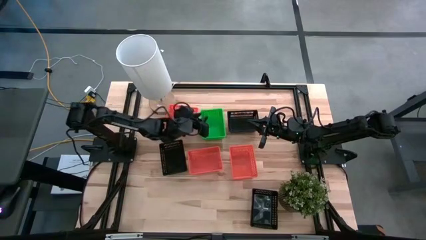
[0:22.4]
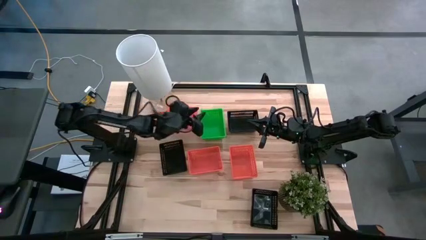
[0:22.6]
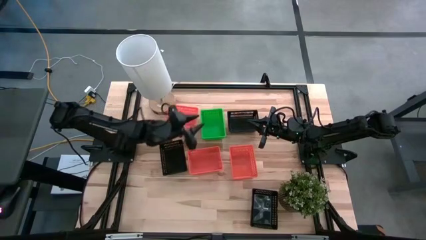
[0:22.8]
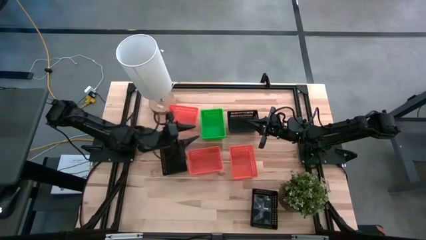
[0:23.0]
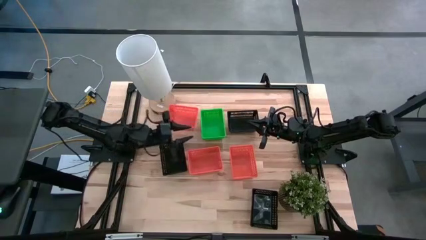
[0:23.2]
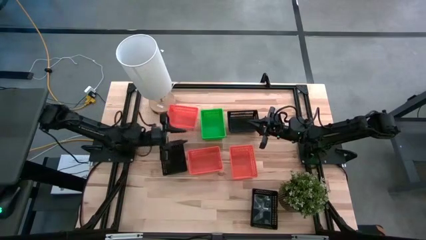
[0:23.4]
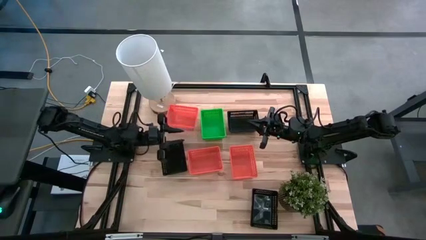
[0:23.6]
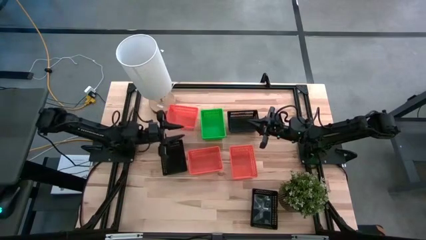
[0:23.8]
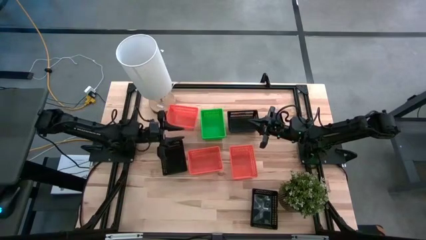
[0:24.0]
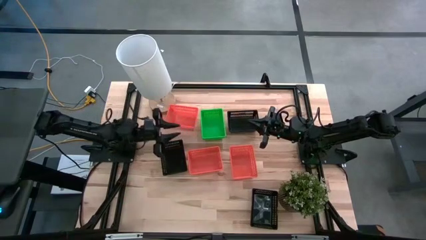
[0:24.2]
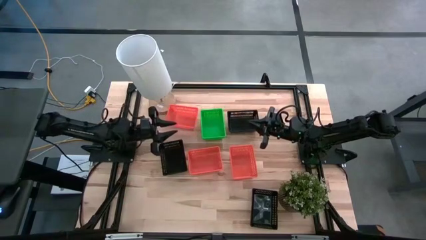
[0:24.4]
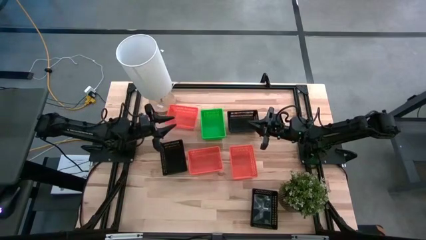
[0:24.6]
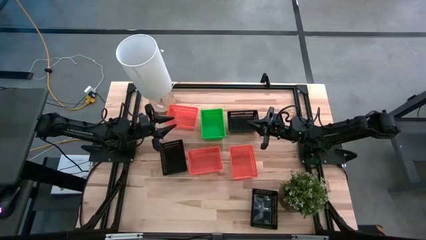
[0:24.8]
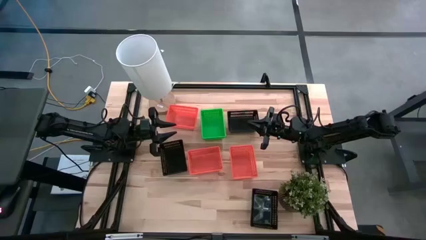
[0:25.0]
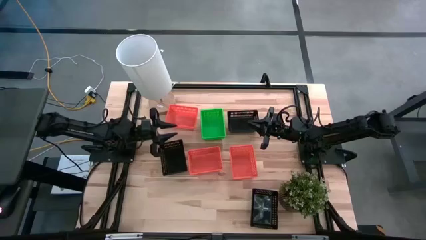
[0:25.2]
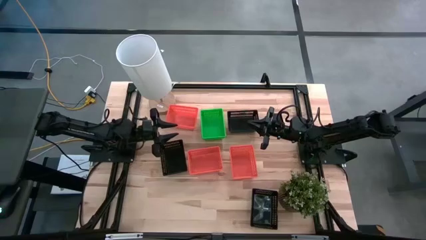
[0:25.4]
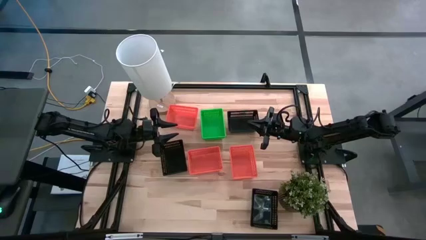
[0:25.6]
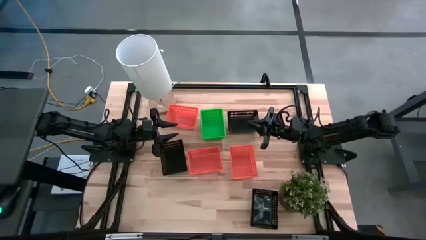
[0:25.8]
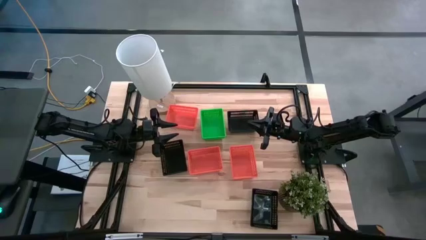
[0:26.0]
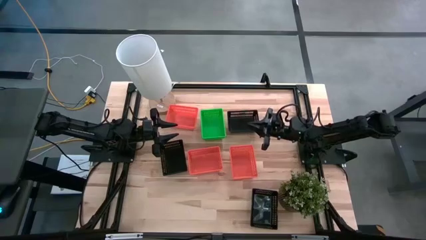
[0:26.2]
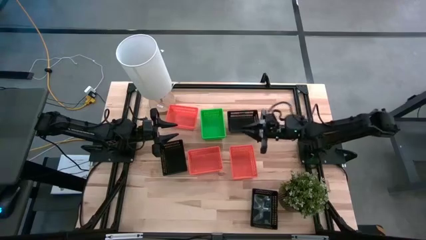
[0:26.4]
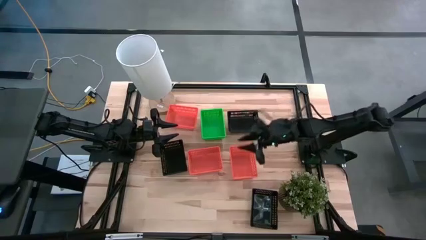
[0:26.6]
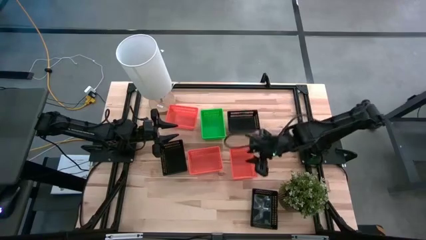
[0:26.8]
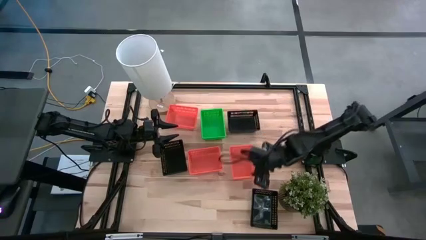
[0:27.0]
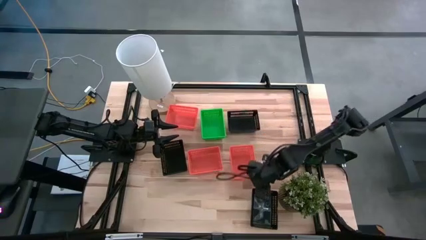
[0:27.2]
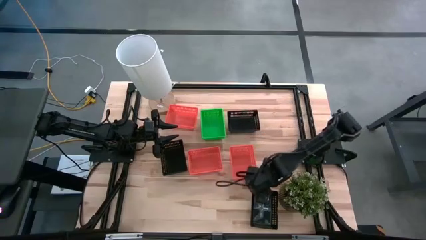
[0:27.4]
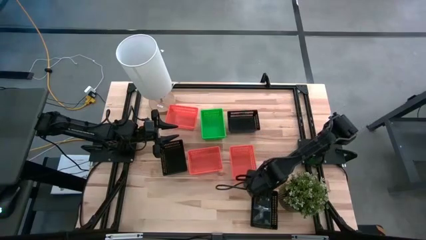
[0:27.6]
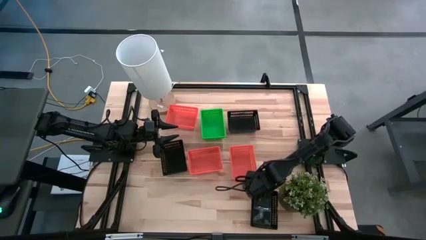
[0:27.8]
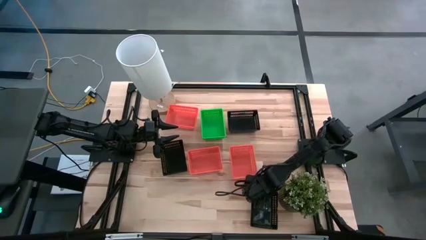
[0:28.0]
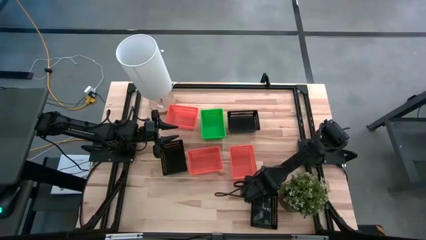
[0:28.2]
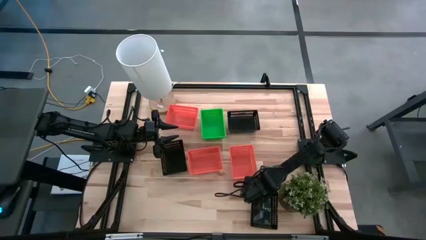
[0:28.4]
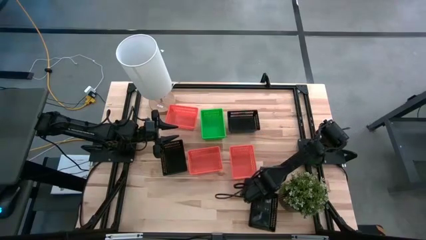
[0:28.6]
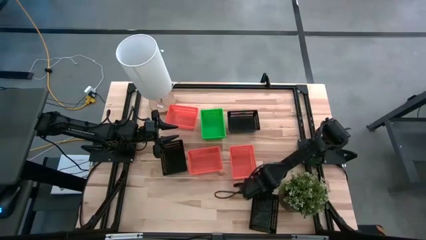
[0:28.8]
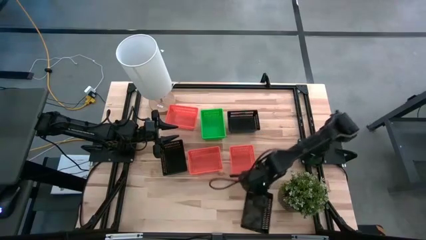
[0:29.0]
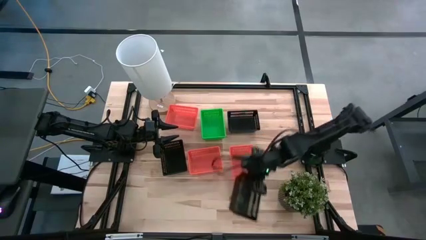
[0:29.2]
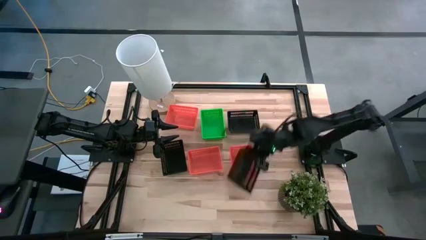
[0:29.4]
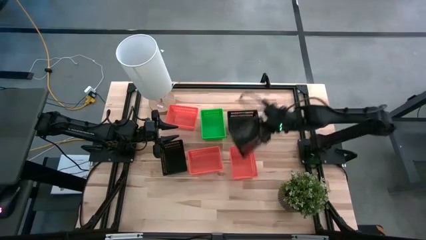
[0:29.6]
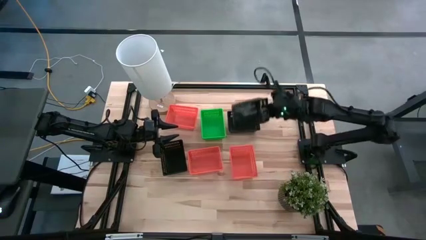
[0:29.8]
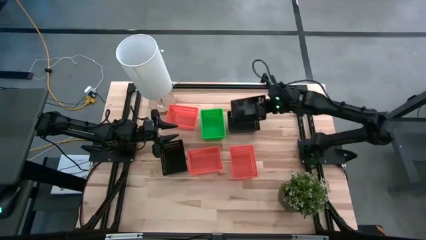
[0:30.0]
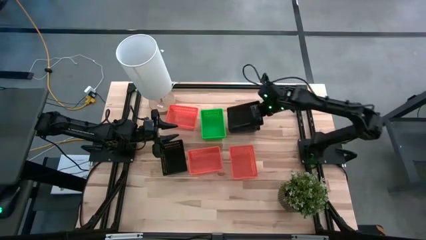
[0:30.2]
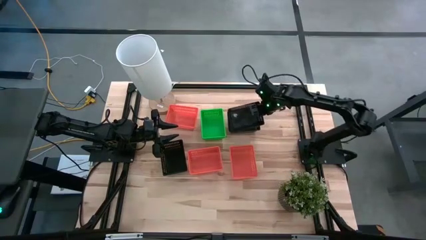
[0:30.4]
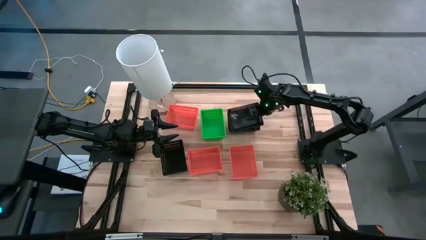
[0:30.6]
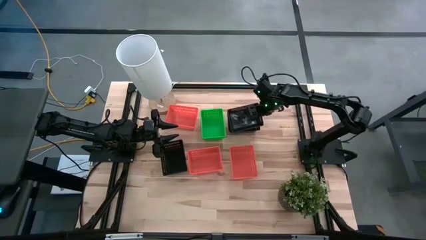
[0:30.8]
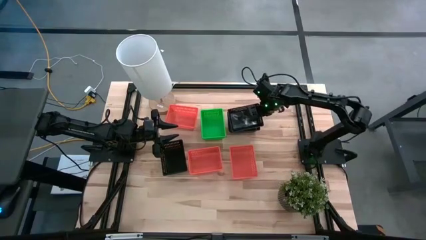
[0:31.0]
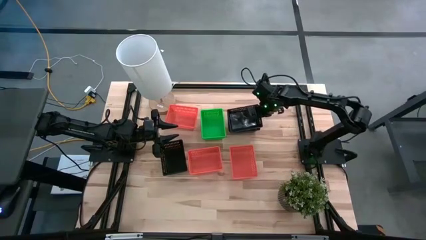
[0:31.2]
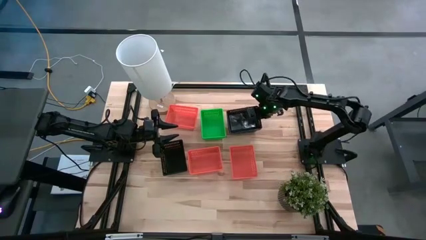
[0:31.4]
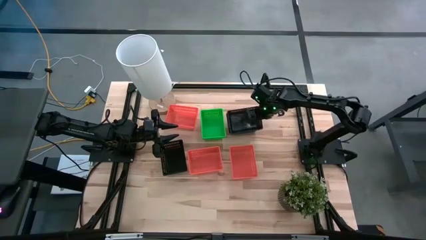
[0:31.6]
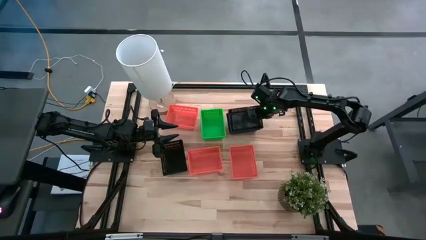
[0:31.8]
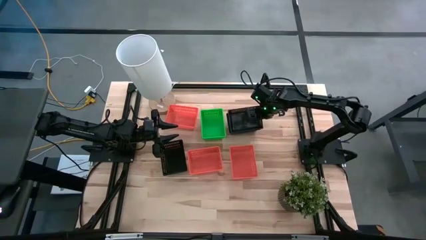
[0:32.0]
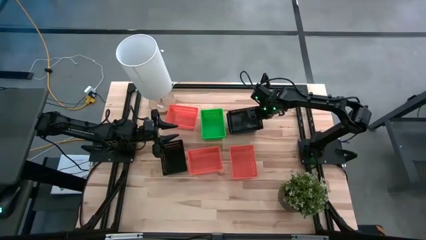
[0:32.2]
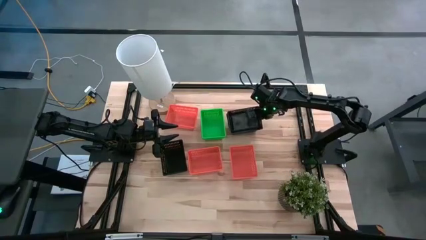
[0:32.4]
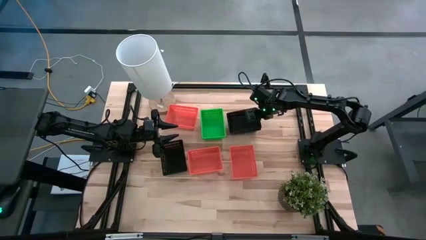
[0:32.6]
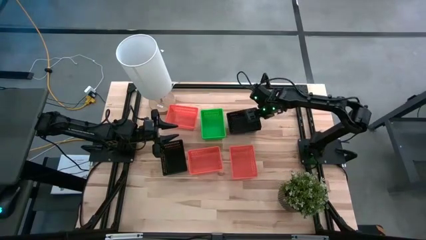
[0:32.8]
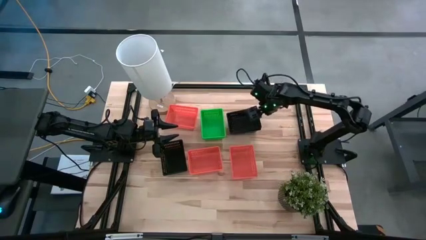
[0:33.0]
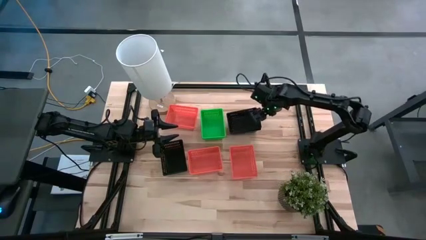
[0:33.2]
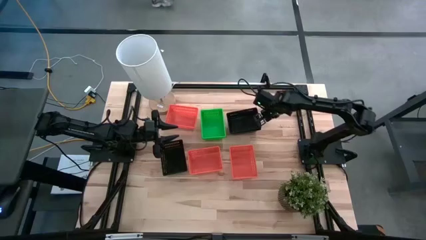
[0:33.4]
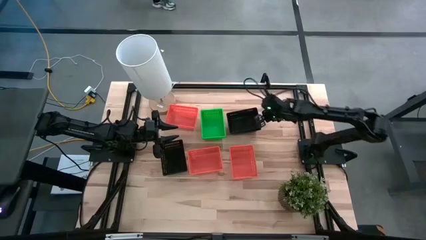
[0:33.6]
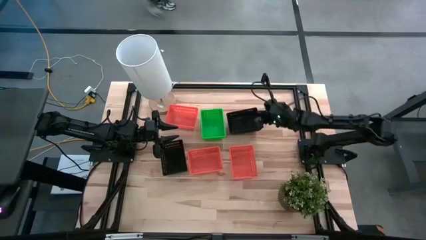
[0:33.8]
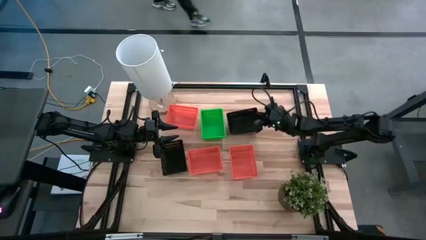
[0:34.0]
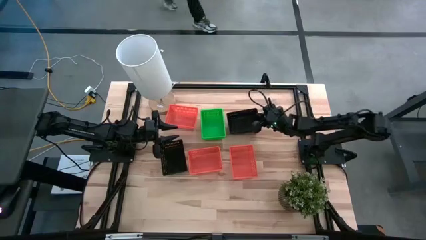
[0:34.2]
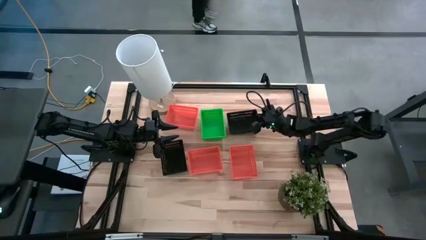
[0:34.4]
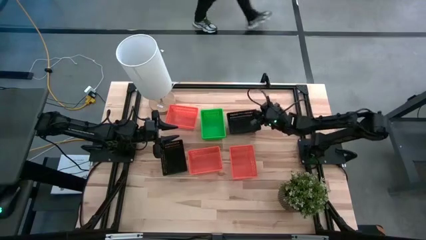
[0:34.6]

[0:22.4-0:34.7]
Stack the bottom black bin on top of the top black bin

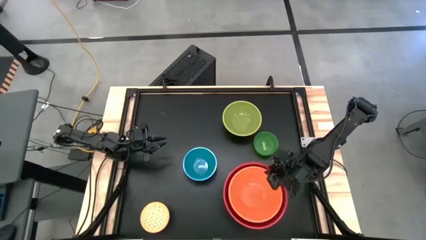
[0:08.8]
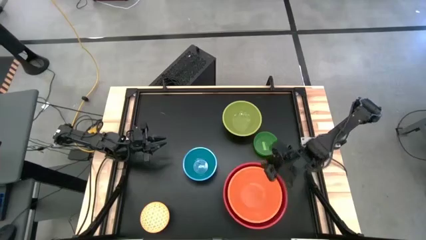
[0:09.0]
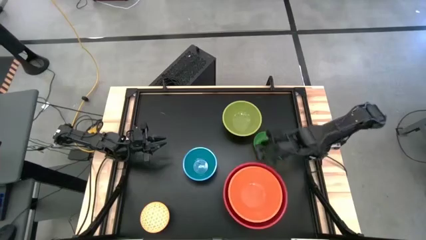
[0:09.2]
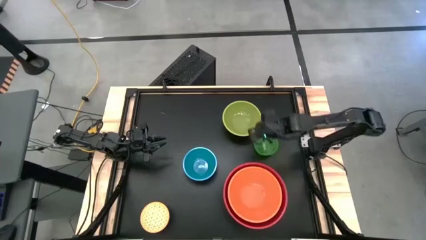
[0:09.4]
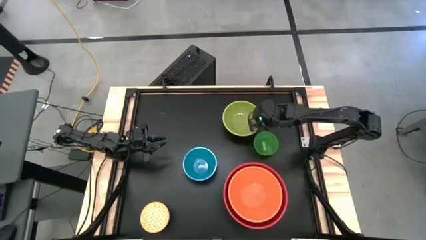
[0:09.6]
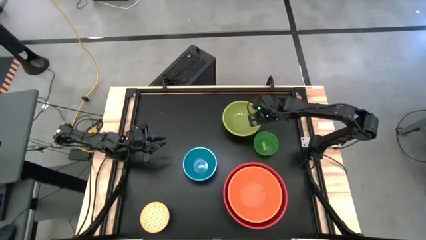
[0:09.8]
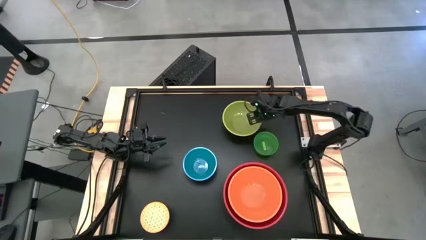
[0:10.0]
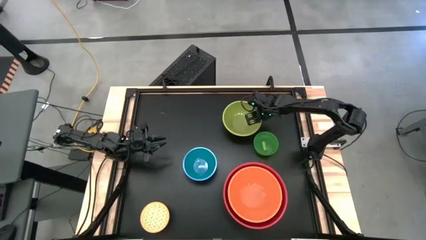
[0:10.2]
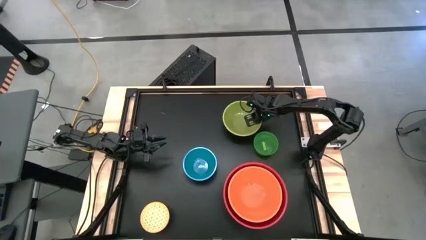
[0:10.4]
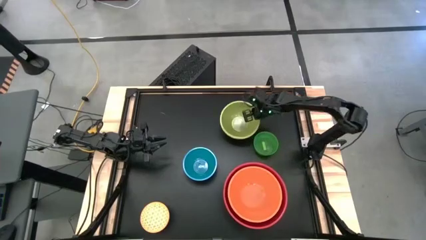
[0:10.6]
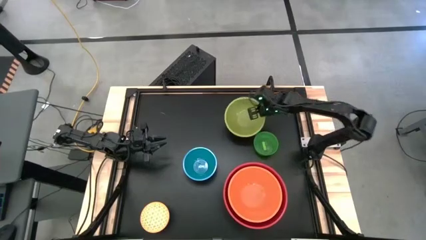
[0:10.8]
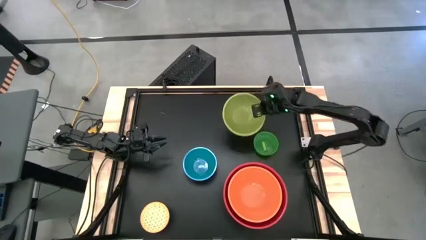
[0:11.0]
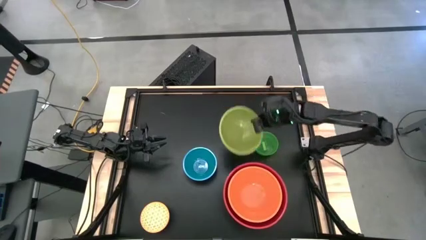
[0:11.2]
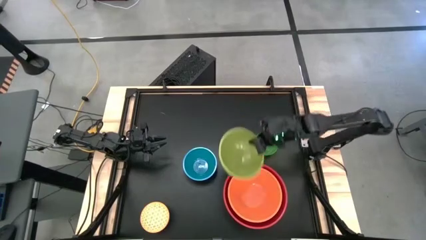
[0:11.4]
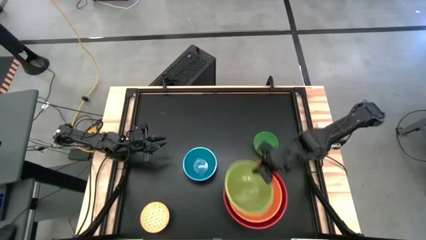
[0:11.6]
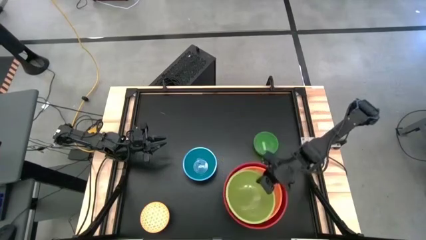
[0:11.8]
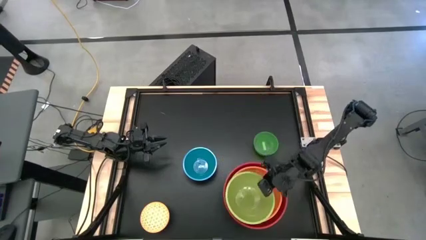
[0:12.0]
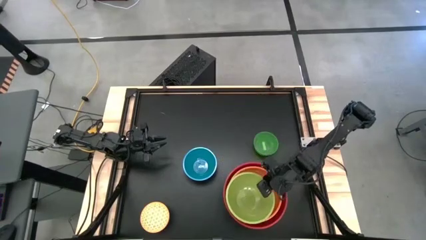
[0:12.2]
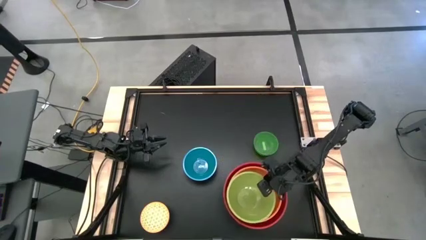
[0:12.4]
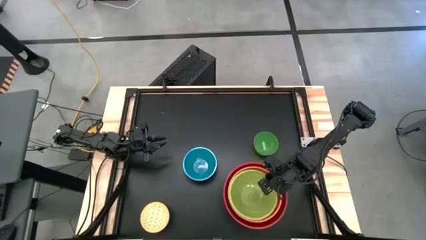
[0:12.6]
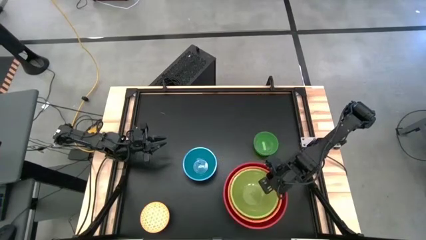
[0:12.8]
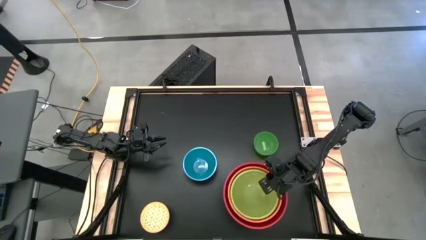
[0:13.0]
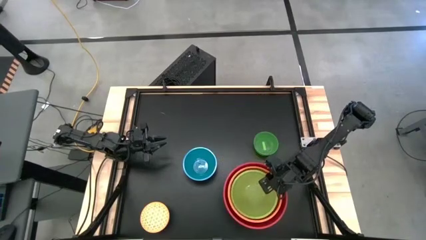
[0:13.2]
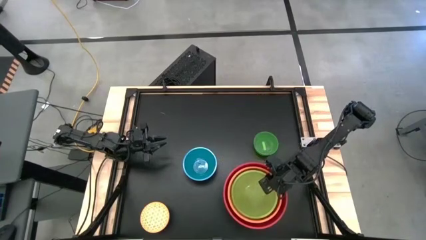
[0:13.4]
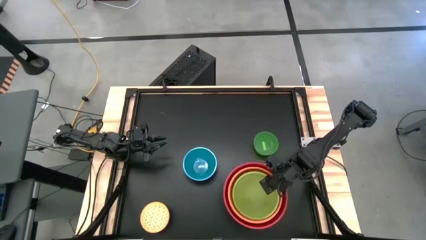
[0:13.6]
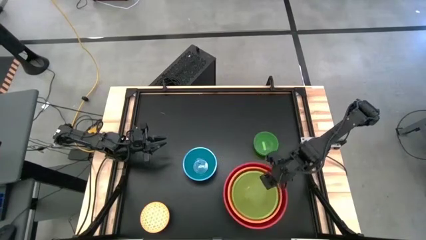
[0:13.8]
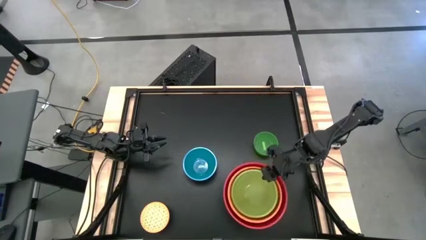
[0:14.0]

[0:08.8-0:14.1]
Stack the light green bowl on top of the orange bowl
